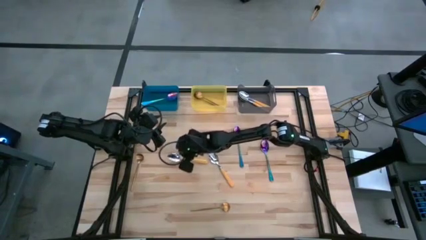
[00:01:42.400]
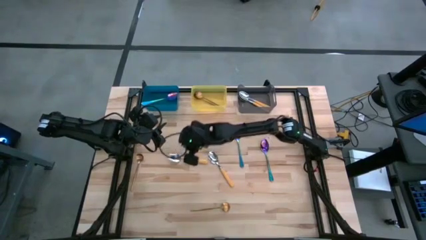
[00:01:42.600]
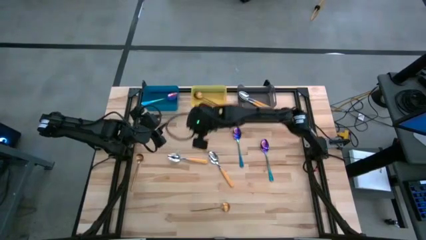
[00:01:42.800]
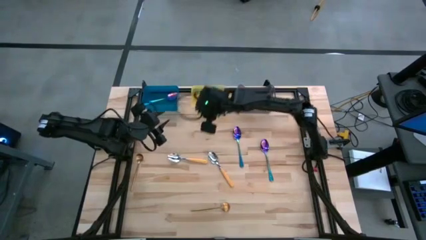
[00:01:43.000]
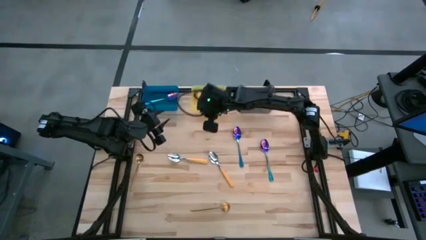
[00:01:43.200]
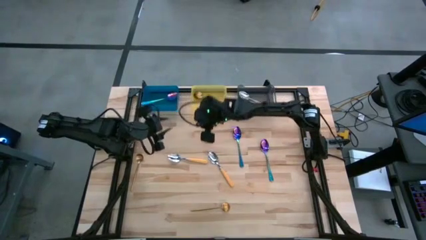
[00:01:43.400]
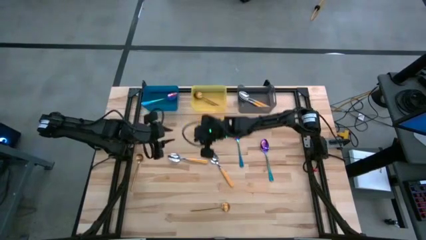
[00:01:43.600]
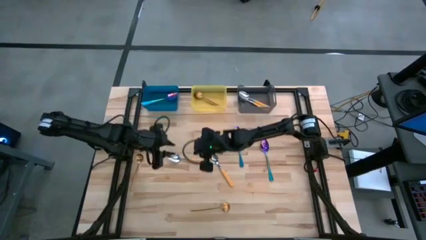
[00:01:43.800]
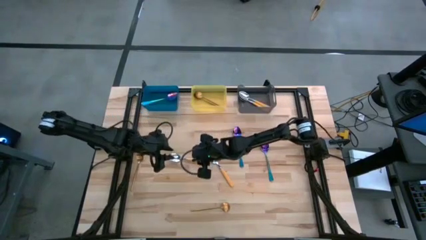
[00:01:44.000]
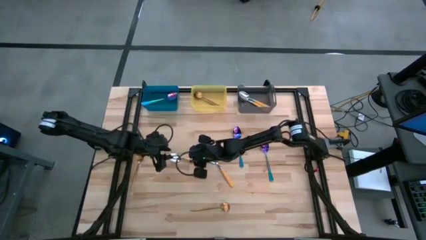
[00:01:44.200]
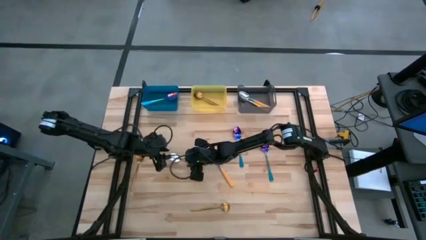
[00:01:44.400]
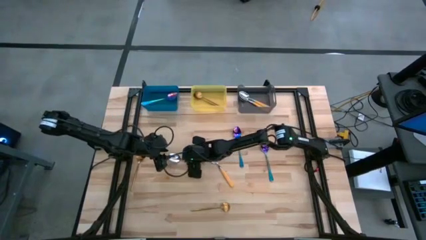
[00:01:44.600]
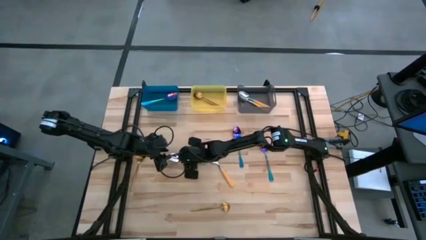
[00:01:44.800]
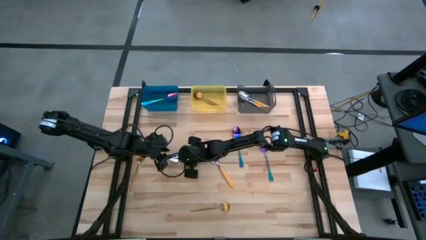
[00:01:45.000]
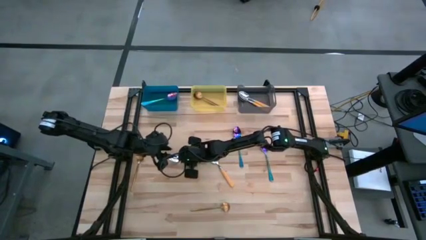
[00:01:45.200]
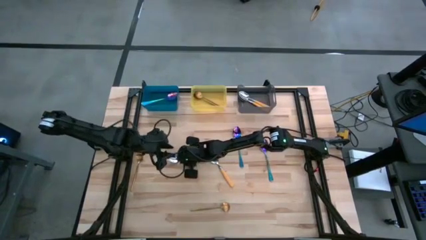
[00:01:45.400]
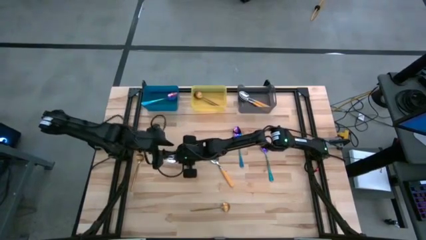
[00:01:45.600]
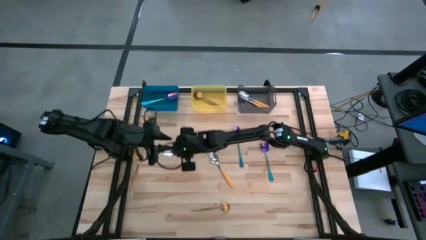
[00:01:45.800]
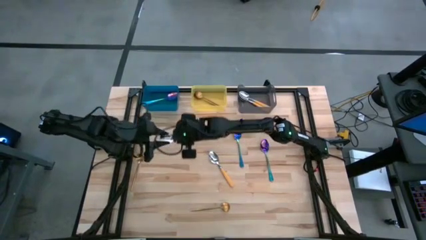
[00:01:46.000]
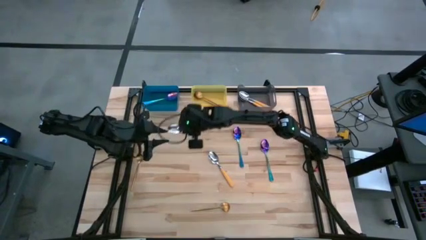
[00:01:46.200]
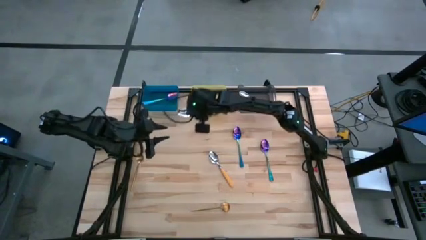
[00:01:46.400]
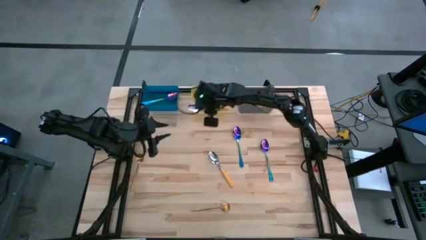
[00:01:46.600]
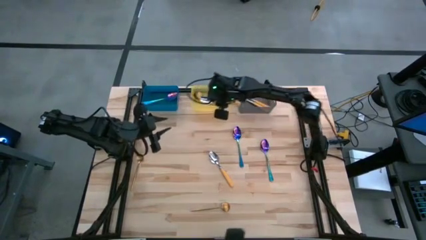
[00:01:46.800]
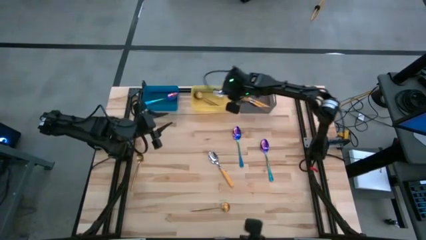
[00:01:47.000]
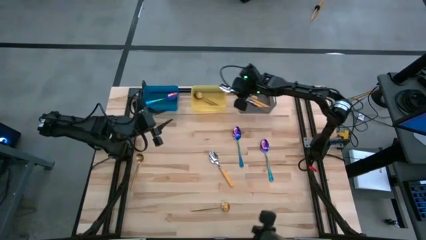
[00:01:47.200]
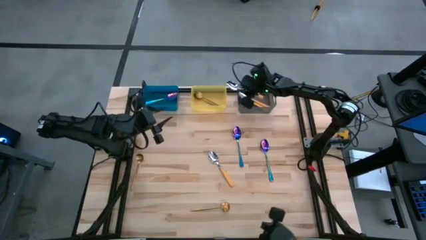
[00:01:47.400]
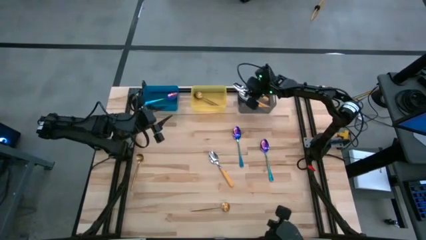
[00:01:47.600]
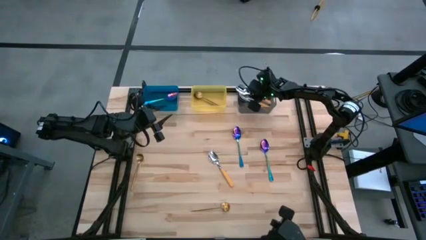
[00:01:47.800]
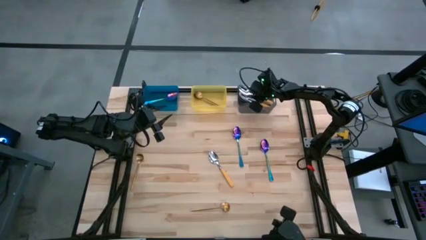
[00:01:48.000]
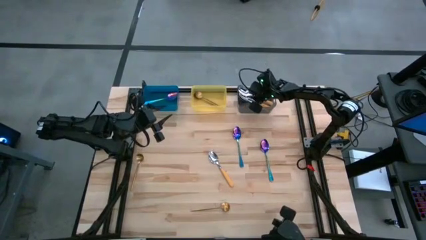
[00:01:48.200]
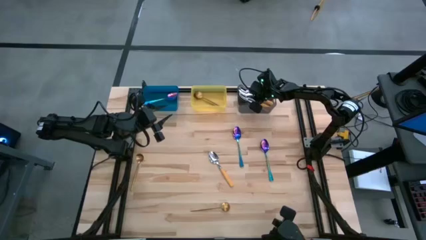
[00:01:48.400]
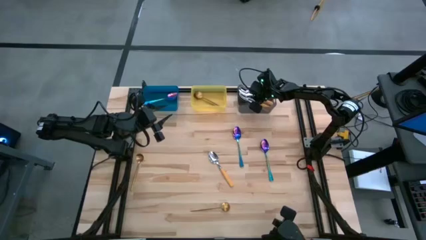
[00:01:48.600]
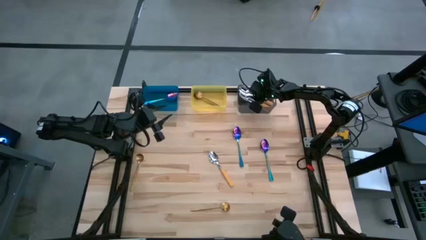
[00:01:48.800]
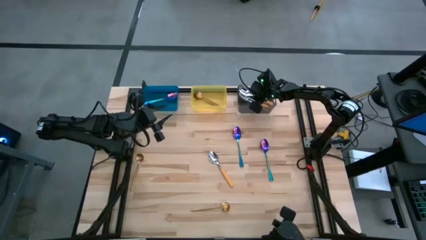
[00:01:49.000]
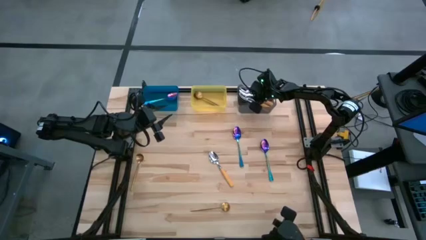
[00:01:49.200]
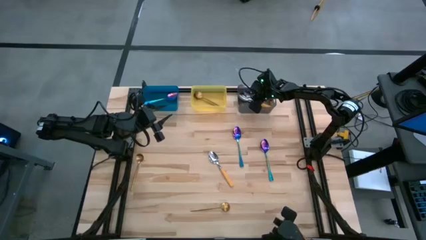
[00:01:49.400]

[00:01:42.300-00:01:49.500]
Task: Sort silverware by color (type)
Put the yellow spoon into the black bin

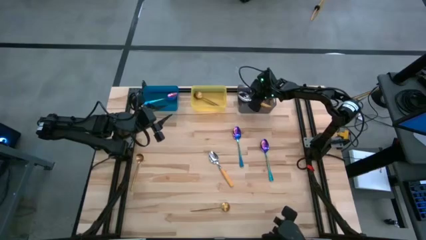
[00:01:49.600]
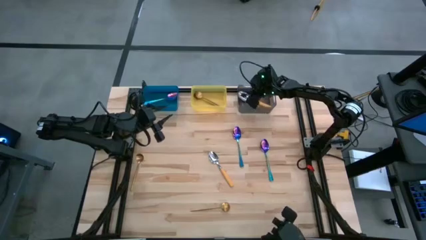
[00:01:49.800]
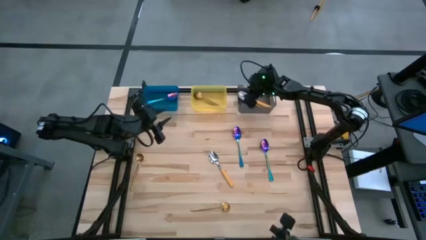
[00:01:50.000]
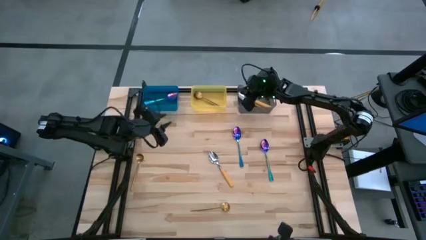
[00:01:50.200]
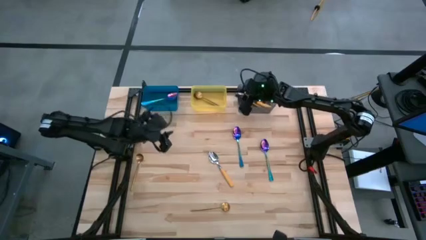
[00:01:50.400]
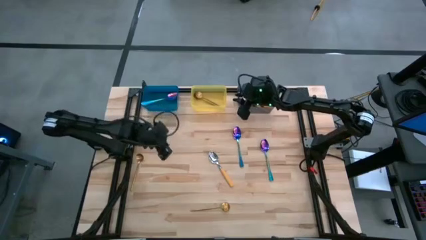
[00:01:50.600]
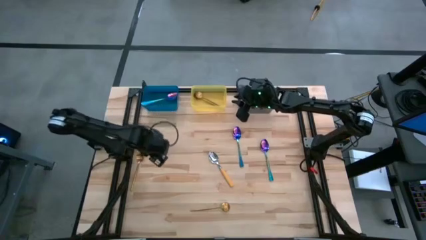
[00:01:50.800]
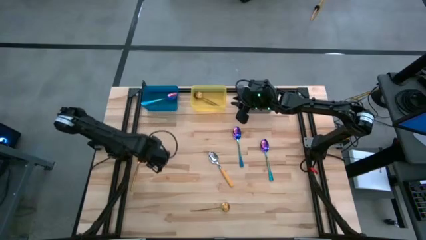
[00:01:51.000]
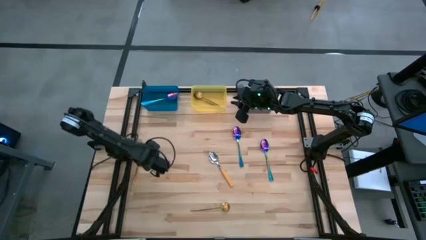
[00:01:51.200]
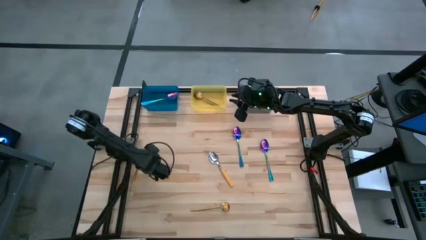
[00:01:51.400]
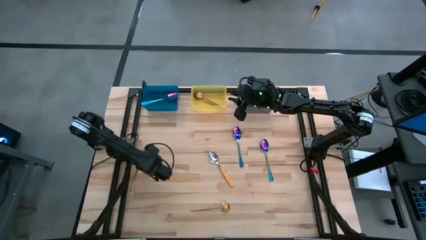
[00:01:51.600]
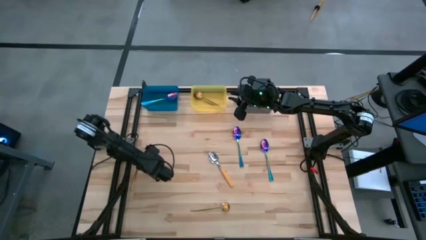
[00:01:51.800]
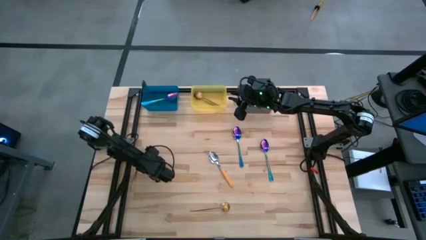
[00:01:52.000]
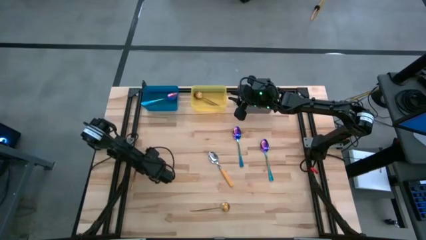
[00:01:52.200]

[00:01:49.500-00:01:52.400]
Put the gold spoon into the yellow bin

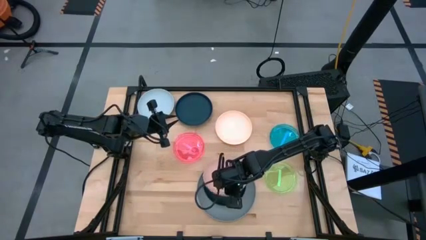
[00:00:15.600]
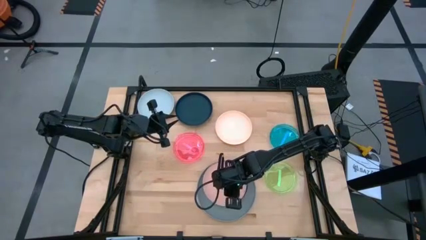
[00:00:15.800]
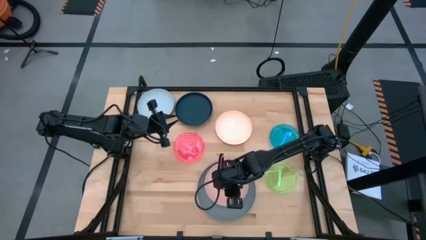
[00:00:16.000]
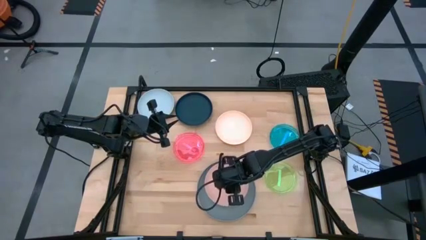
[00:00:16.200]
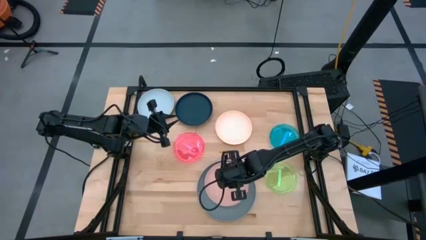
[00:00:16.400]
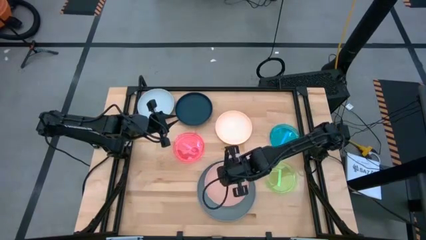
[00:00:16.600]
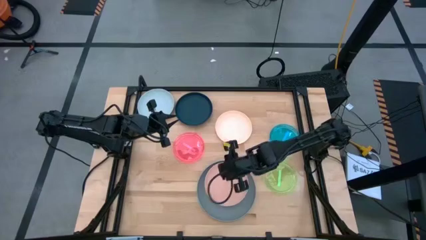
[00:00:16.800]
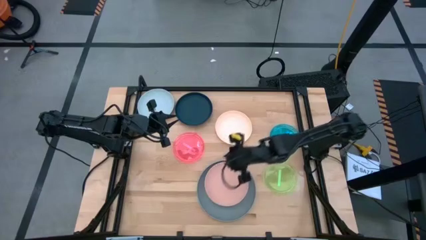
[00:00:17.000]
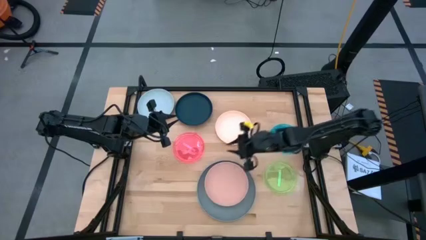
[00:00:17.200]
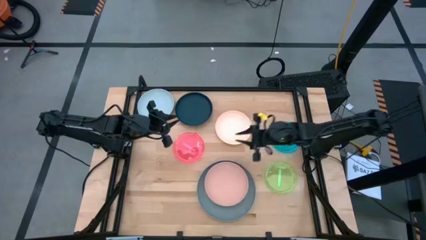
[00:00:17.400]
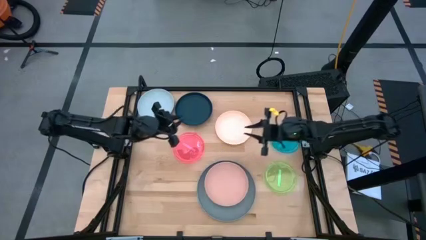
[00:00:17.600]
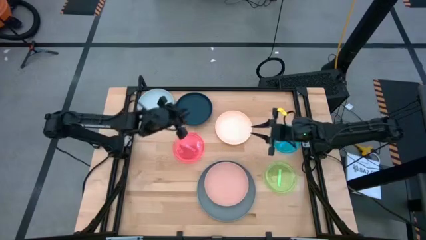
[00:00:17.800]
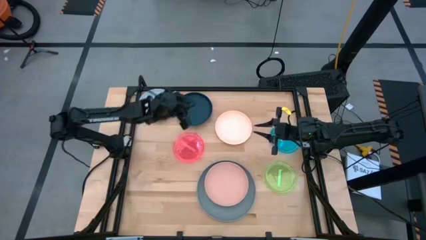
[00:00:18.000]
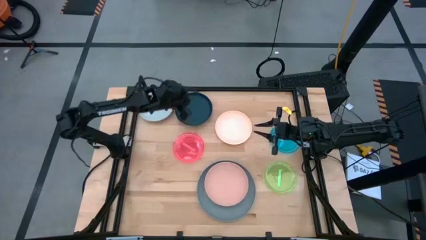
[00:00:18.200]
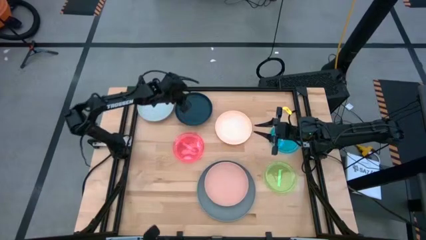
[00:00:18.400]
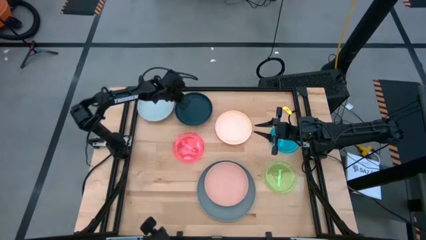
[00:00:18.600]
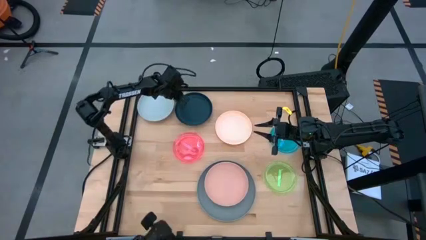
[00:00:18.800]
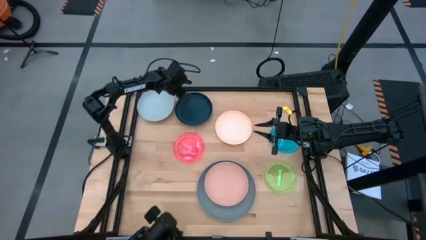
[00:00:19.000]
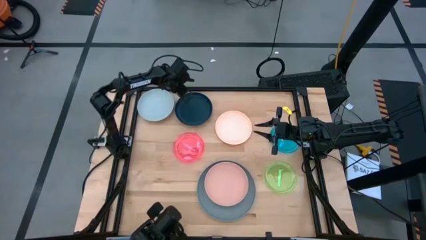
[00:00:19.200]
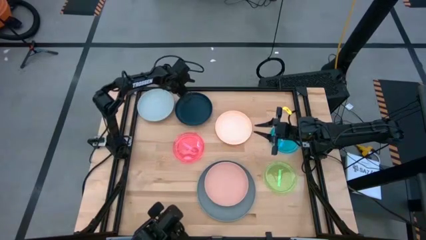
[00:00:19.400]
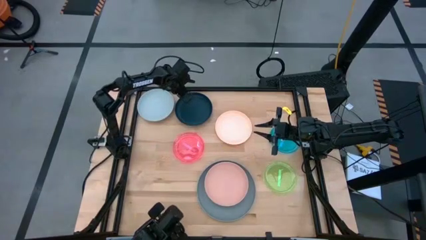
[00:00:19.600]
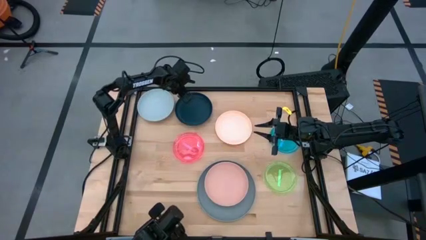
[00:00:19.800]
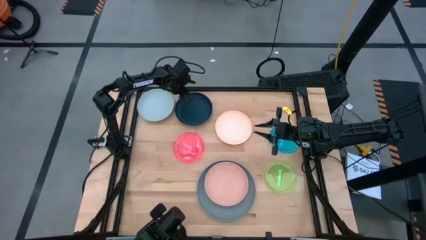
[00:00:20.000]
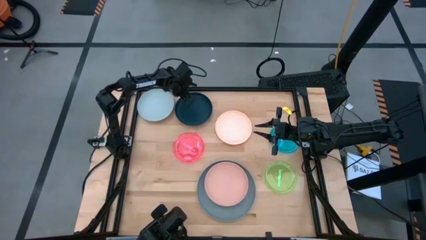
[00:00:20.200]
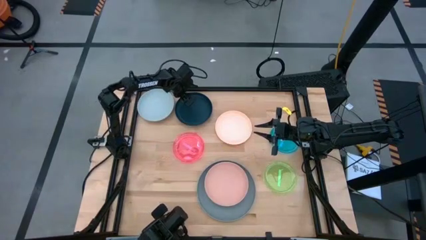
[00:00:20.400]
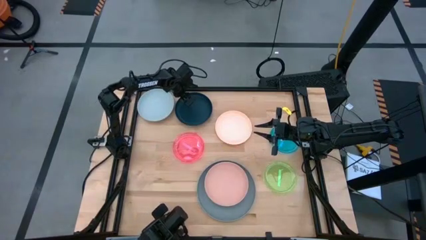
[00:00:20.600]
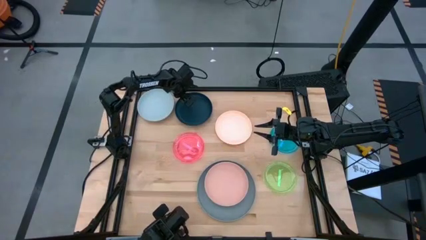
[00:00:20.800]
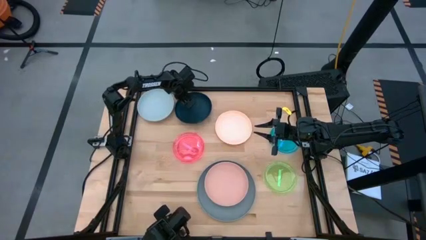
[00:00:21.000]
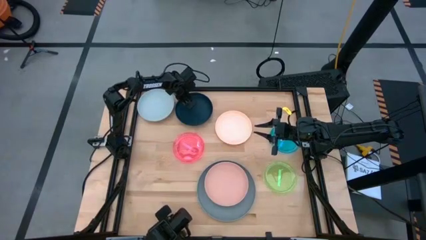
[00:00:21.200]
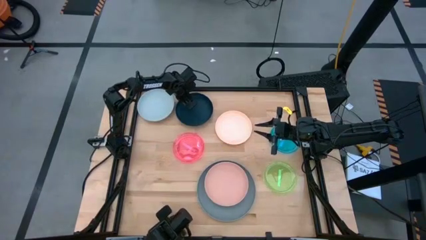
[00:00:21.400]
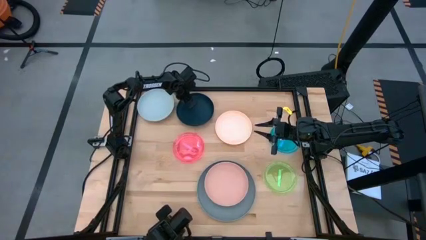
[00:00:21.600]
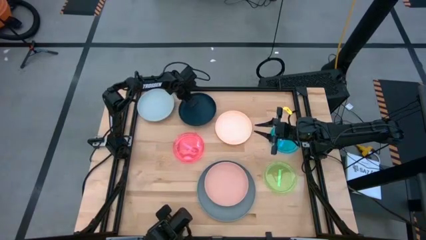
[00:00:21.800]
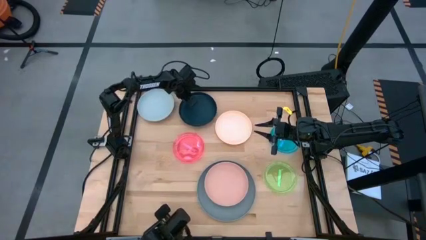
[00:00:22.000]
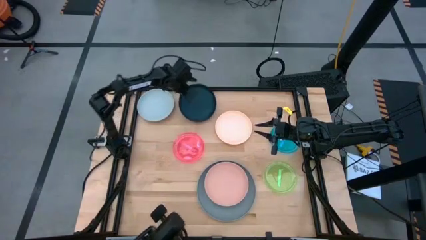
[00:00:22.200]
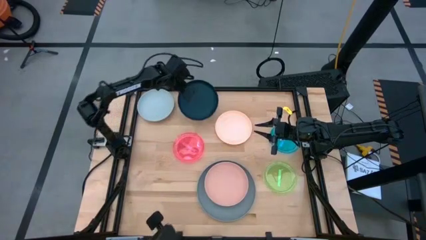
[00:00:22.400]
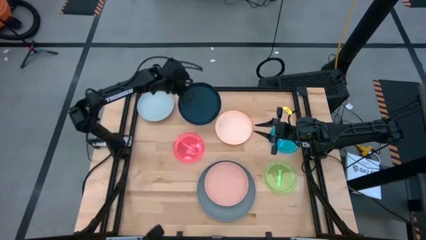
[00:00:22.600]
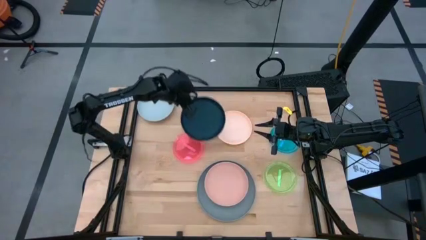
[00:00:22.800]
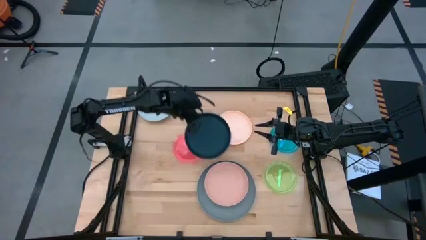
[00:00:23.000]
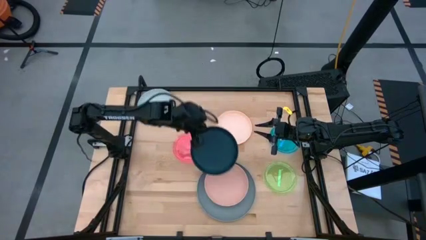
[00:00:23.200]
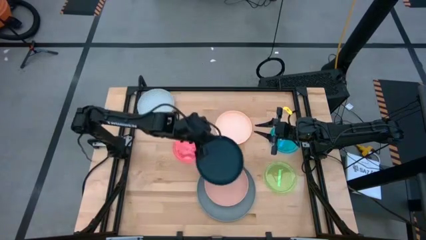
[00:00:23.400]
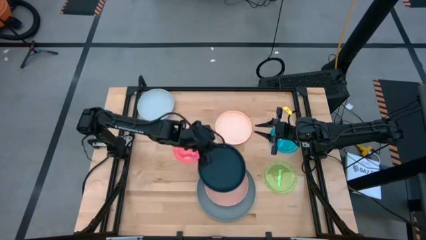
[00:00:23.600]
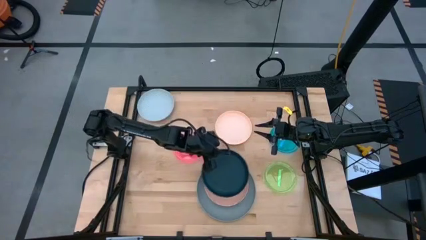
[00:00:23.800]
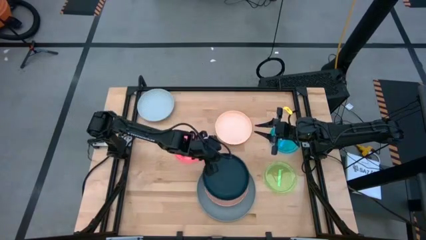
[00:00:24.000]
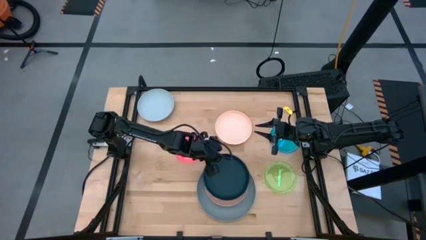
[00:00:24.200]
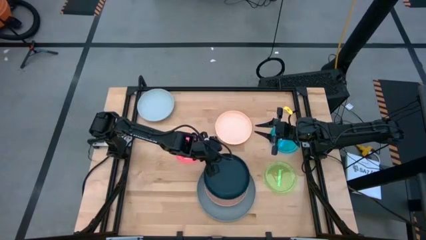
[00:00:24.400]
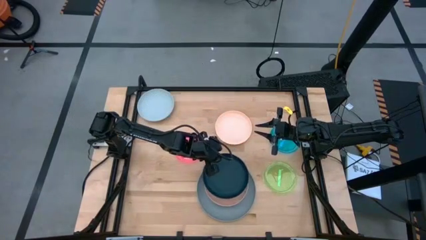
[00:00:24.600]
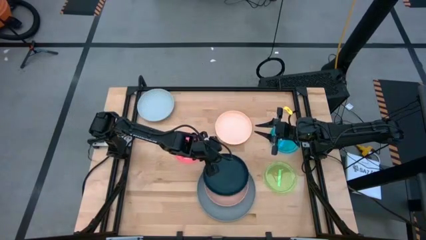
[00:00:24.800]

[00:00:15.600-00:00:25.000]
Task: Stack plastic plates
Stack the black plate on top of the light pink plate
